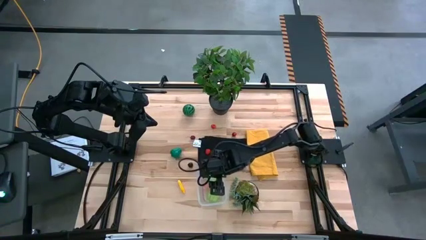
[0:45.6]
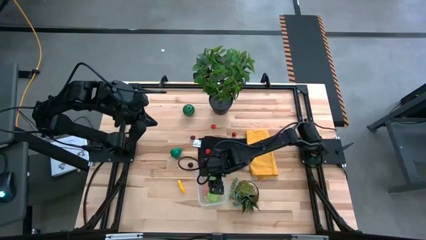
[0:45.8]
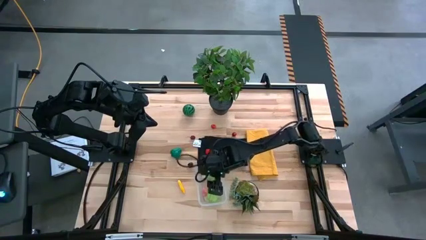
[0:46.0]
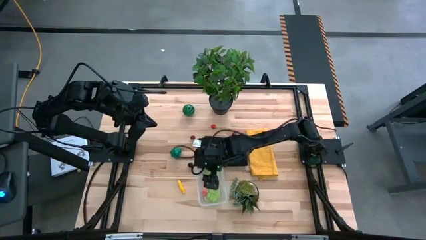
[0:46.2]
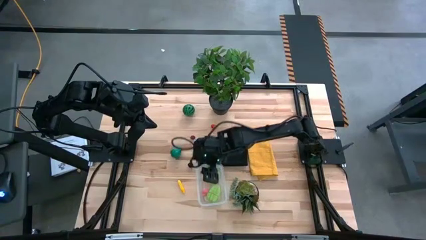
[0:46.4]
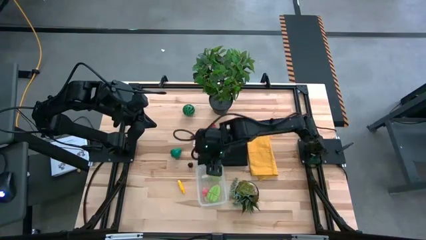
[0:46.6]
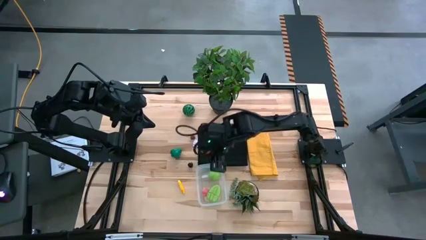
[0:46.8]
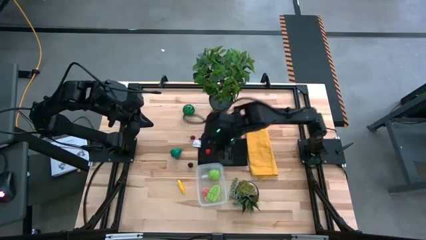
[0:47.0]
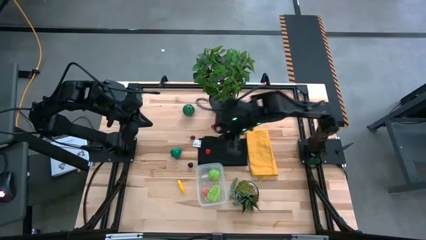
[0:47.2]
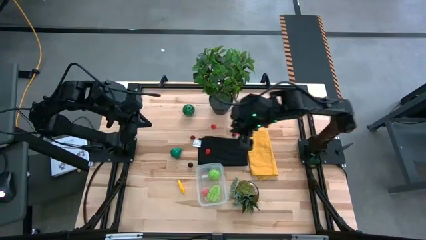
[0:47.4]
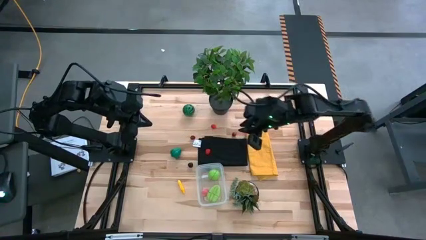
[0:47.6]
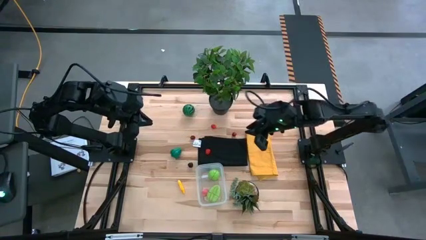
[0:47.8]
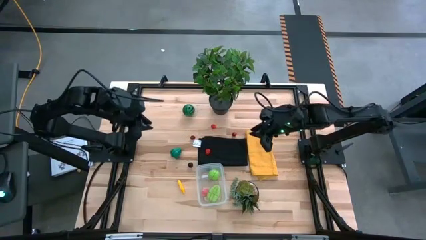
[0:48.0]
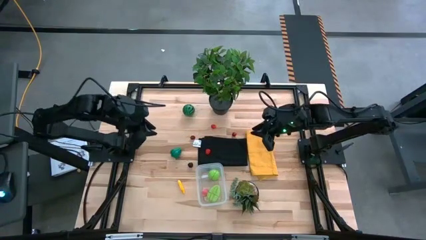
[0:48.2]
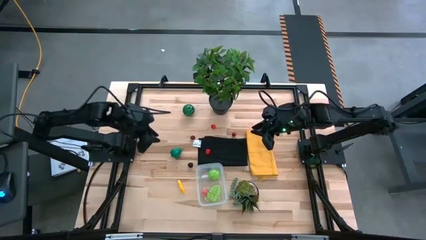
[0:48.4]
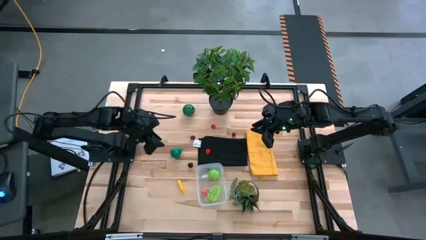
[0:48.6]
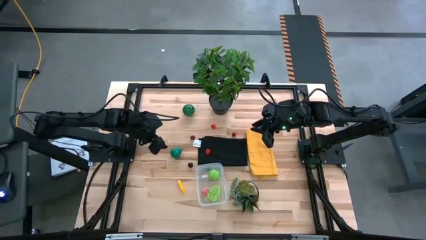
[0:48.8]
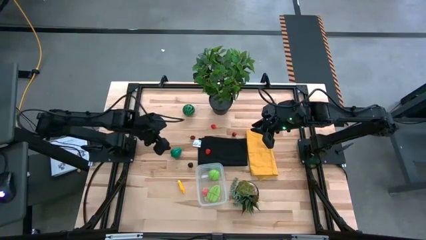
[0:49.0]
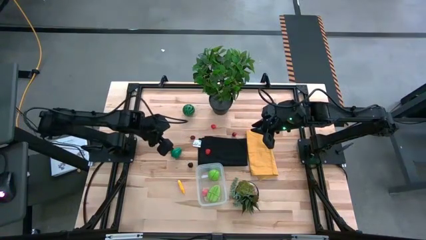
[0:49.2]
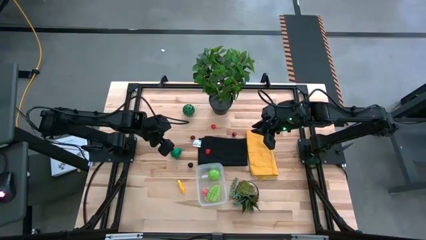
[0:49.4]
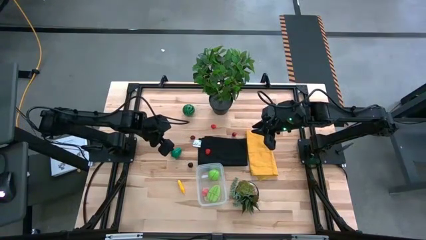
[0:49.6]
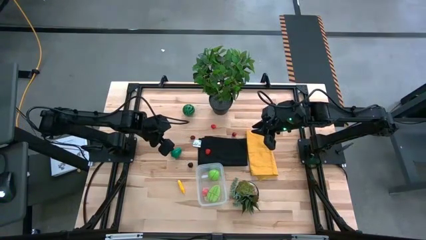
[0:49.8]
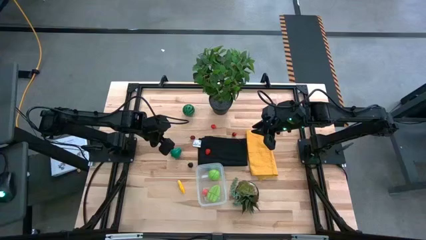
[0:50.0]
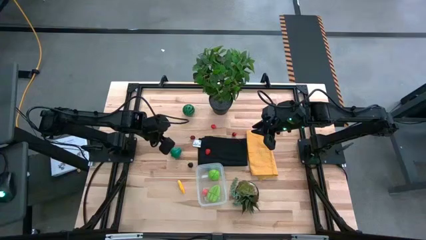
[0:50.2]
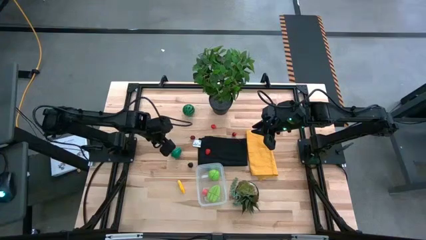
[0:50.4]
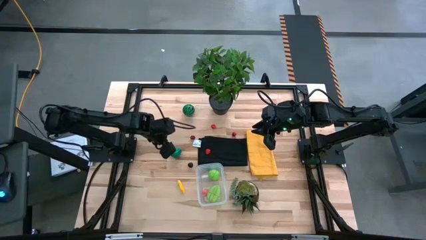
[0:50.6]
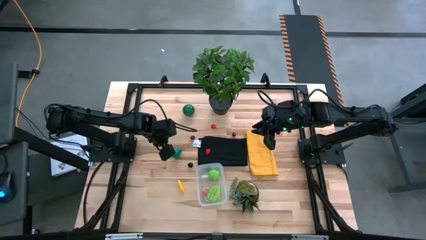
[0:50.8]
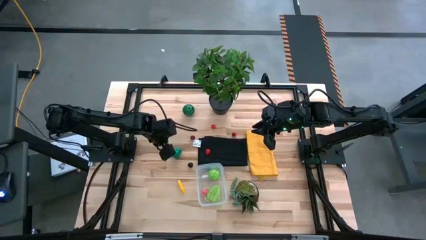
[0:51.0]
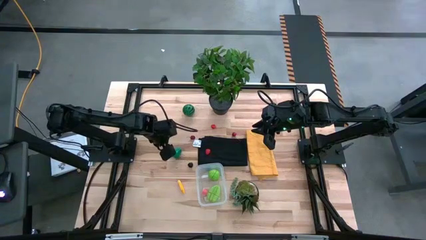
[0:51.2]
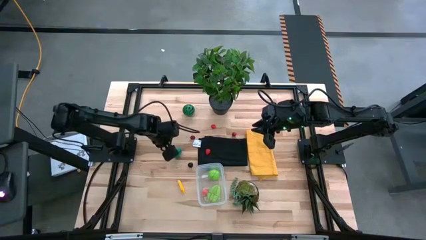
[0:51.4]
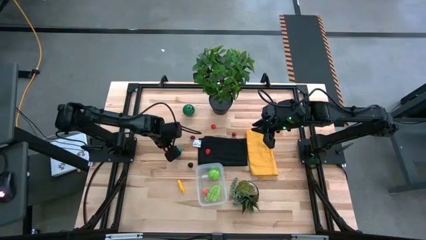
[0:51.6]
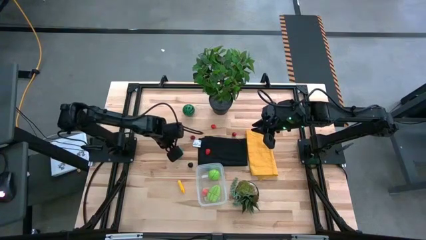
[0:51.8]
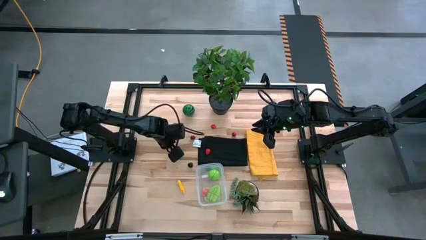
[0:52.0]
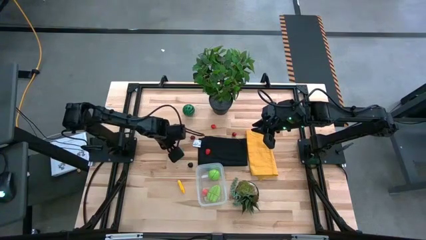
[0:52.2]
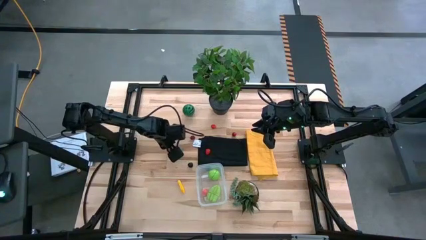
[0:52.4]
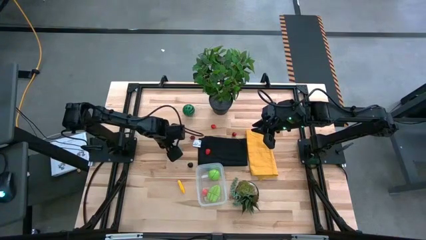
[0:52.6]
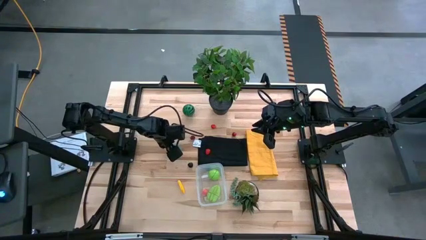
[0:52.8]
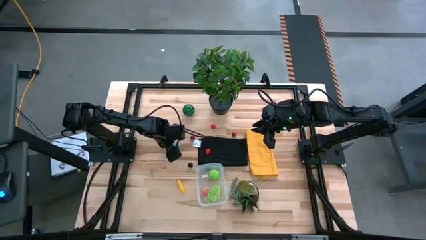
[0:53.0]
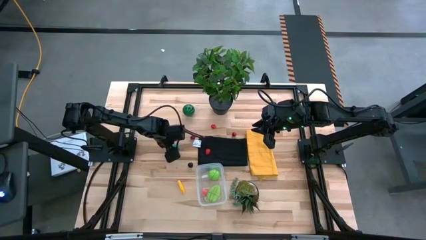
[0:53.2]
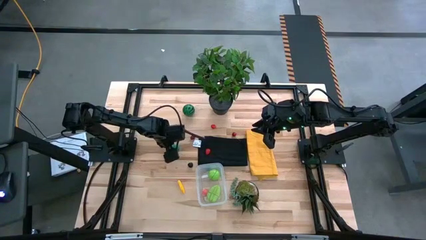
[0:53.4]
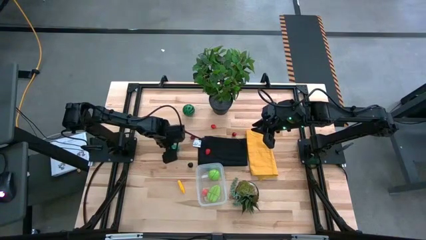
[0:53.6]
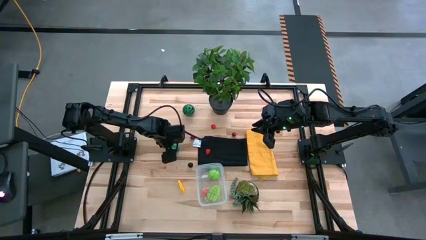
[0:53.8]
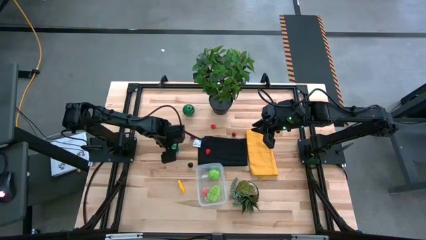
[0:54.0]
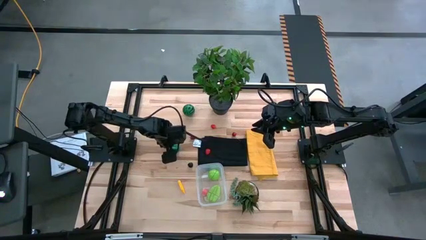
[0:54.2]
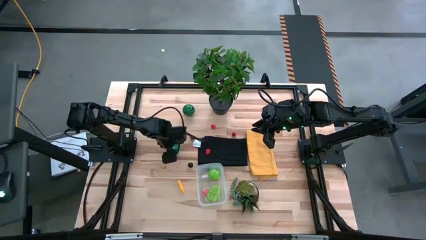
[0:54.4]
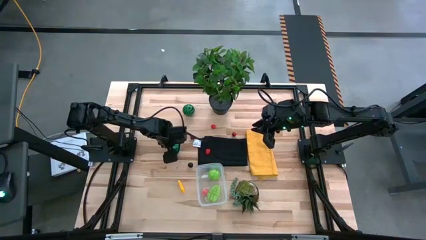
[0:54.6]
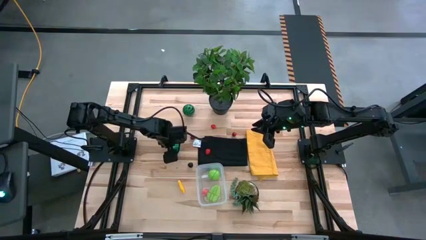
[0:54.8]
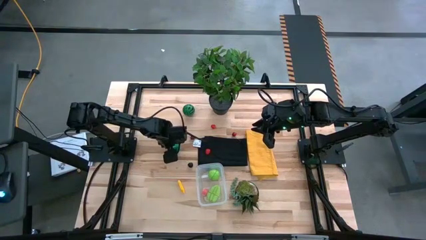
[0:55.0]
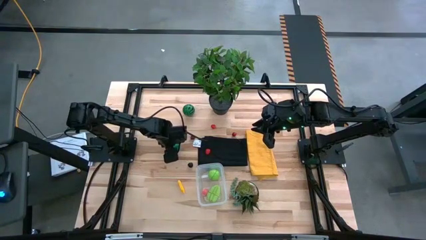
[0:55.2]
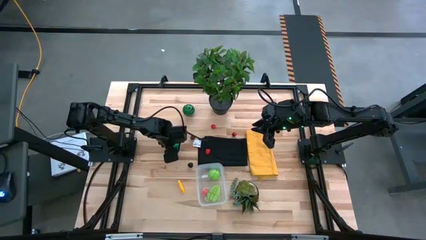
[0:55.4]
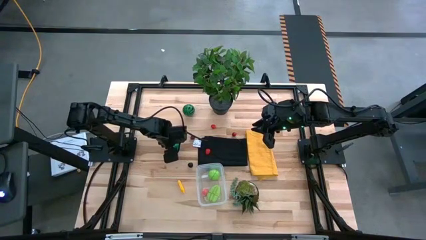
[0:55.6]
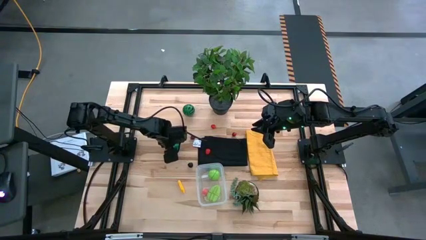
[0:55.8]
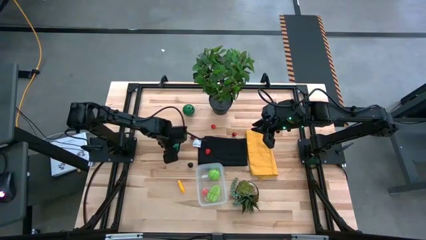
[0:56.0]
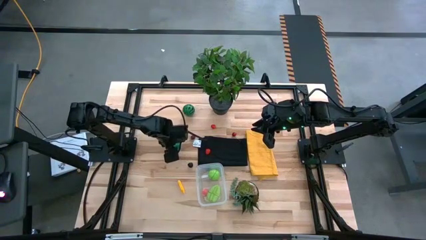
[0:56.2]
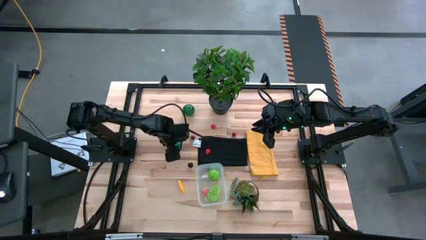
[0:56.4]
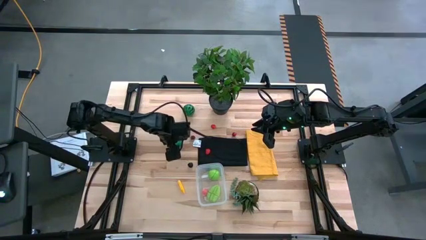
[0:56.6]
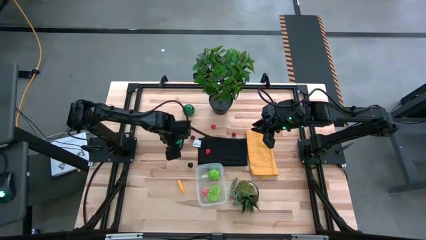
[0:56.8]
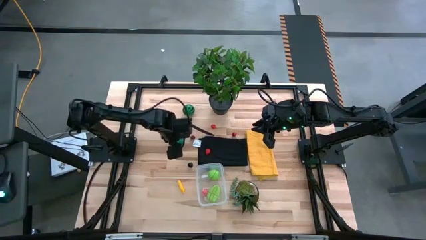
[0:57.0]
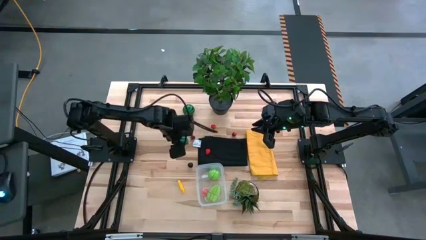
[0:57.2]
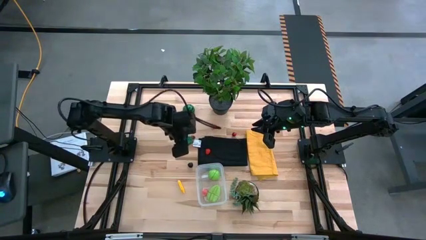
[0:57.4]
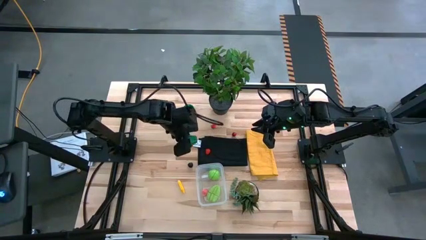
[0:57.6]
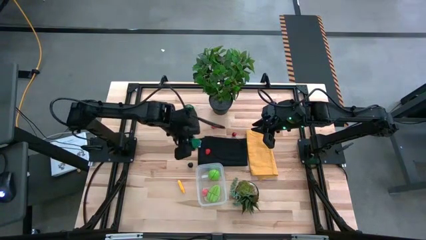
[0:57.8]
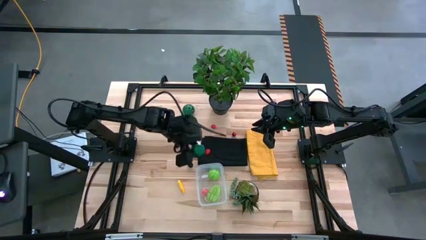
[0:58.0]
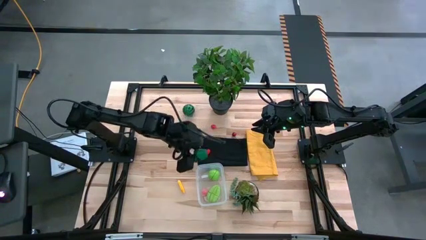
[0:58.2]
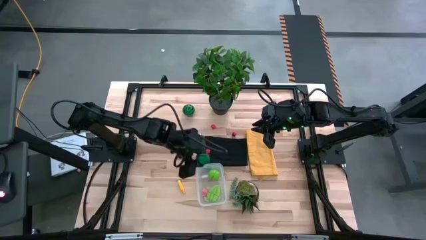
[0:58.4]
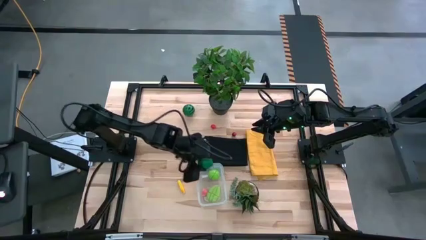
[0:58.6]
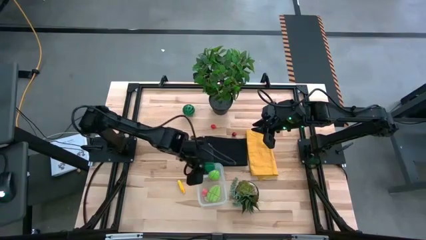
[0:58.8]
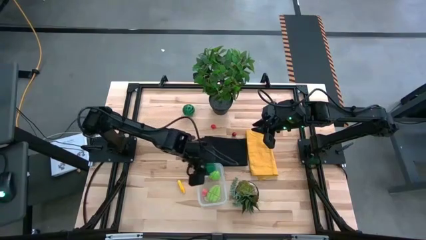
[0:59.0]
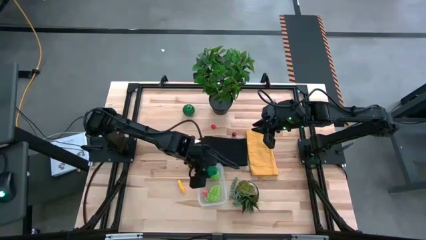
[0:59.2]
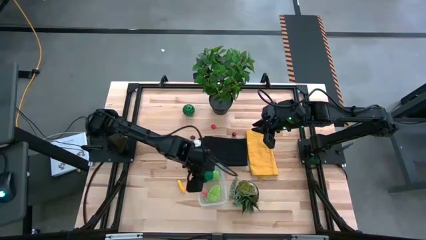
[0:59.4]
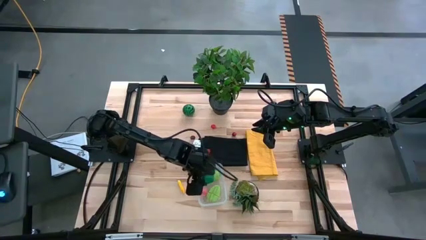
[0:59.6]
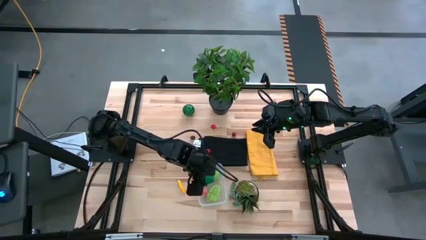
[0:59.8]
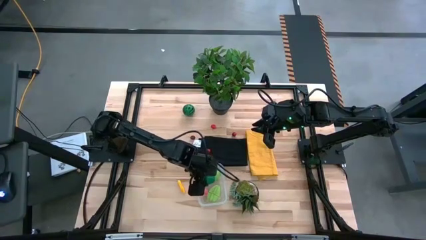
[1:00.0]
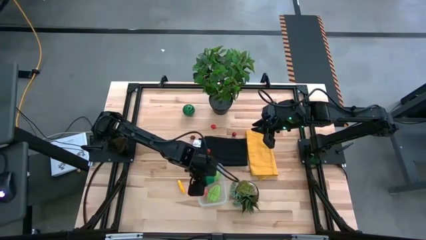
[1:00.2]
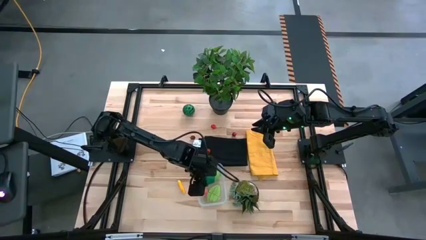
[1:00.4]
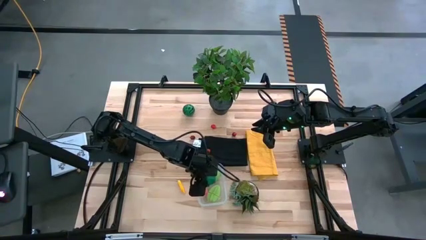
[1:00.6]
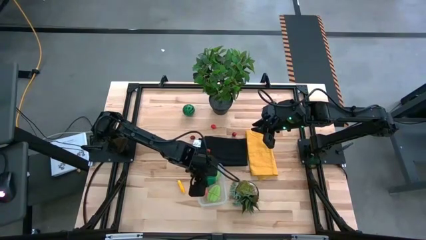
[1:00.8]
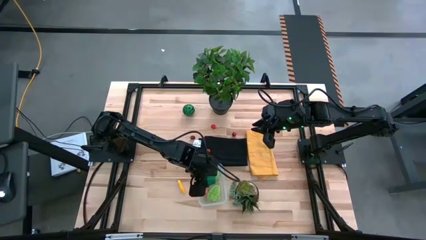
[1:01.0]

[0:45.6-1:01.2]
Task: Pick and placing Produce into tupperware
Put the bell pepper into the bin
